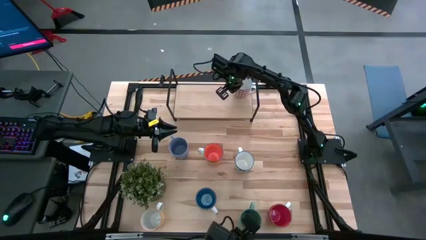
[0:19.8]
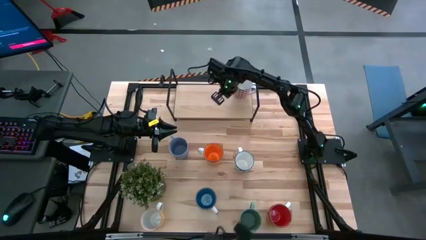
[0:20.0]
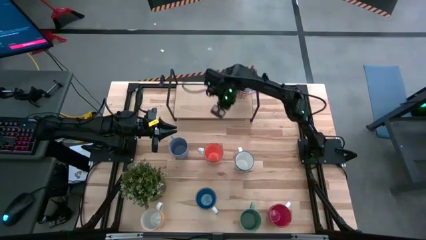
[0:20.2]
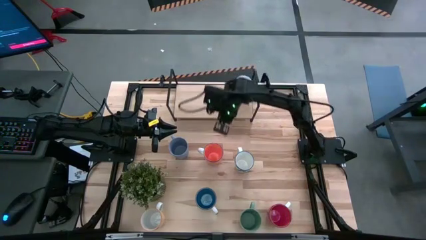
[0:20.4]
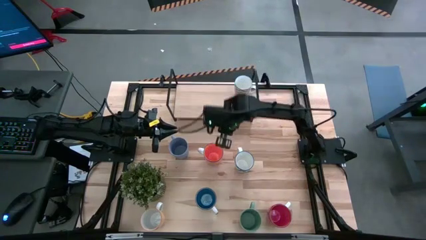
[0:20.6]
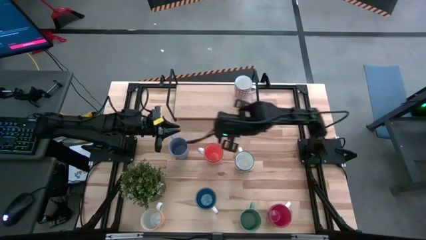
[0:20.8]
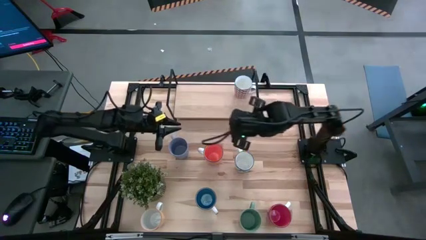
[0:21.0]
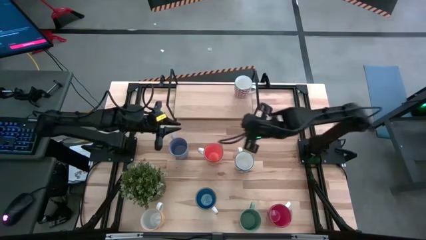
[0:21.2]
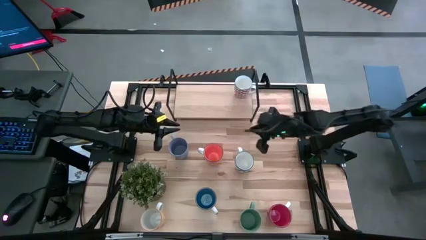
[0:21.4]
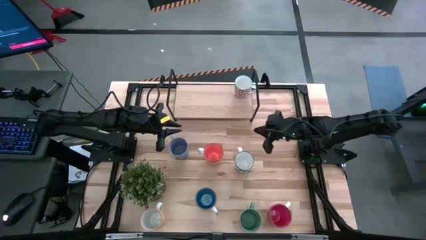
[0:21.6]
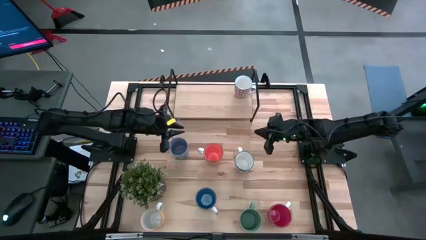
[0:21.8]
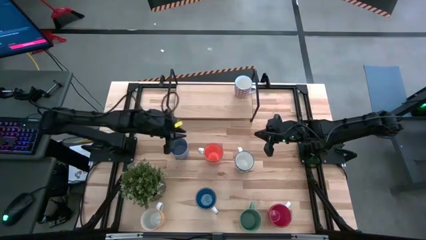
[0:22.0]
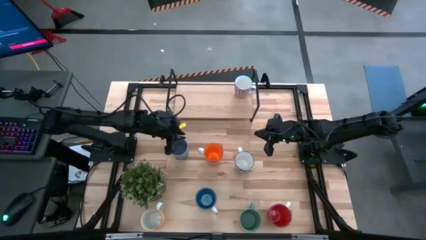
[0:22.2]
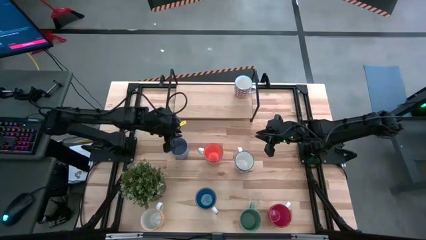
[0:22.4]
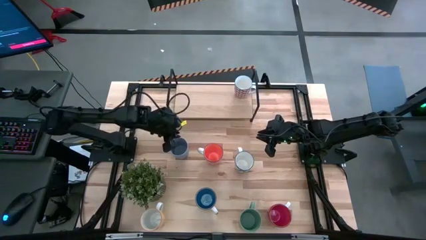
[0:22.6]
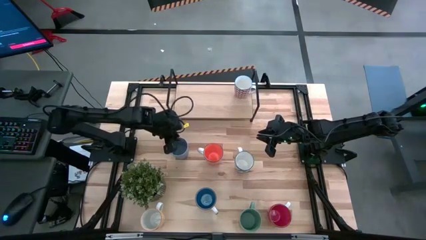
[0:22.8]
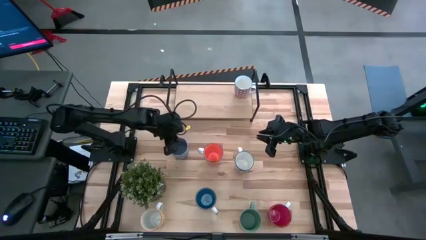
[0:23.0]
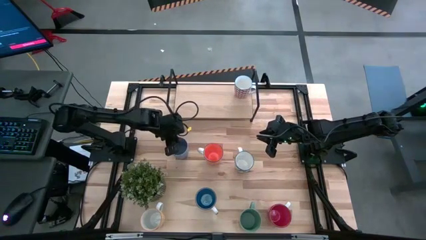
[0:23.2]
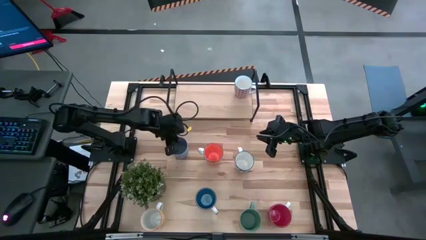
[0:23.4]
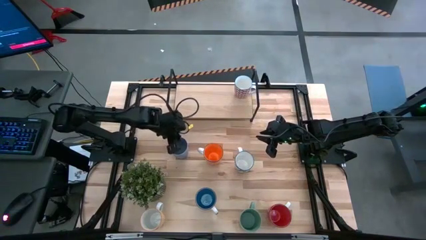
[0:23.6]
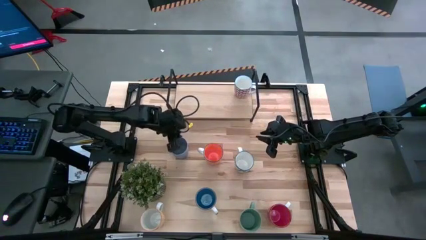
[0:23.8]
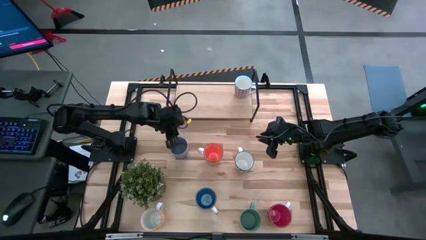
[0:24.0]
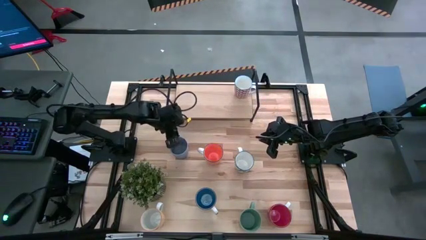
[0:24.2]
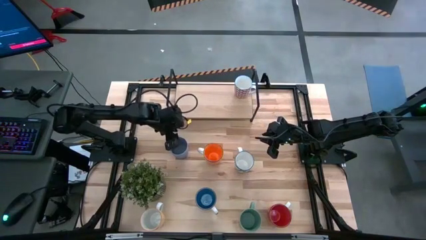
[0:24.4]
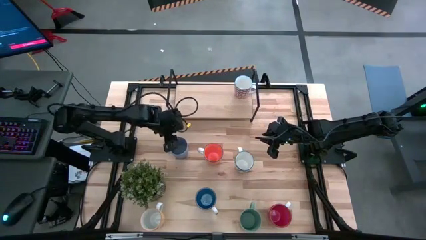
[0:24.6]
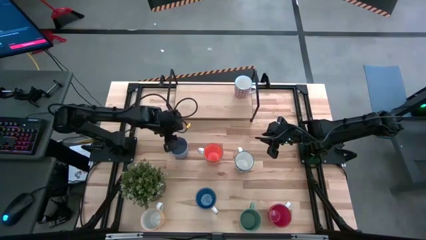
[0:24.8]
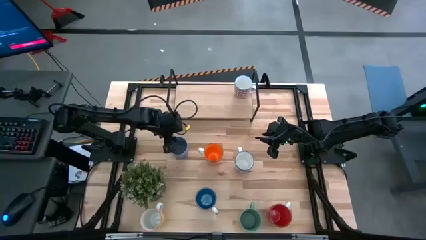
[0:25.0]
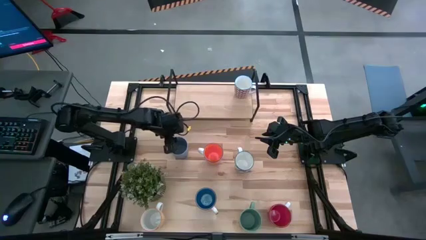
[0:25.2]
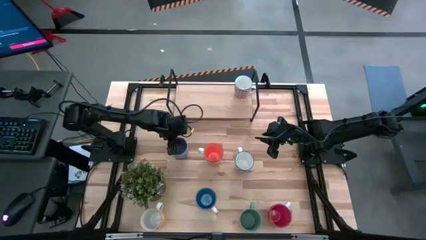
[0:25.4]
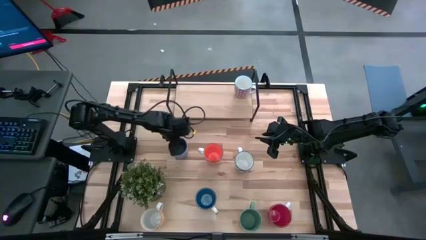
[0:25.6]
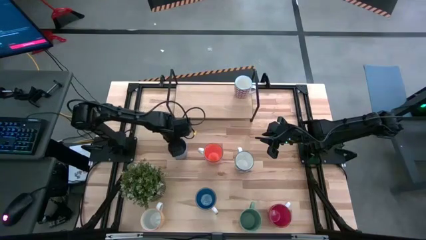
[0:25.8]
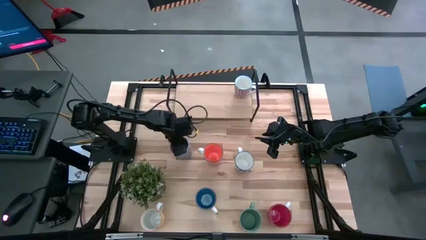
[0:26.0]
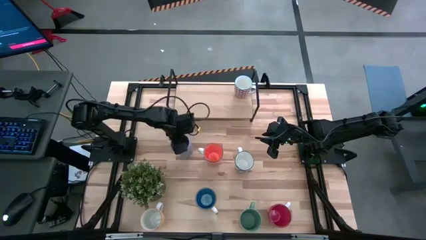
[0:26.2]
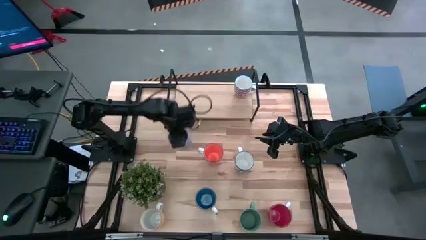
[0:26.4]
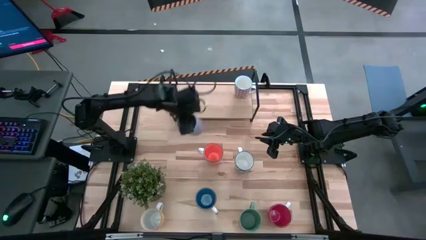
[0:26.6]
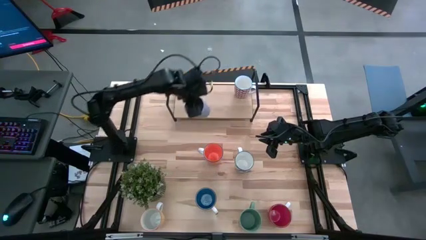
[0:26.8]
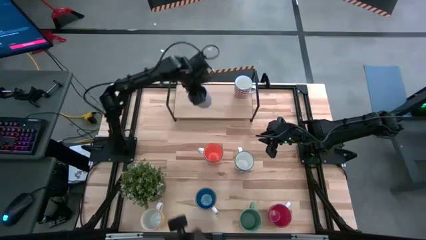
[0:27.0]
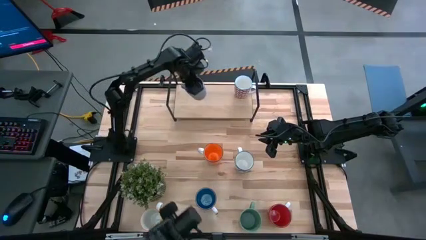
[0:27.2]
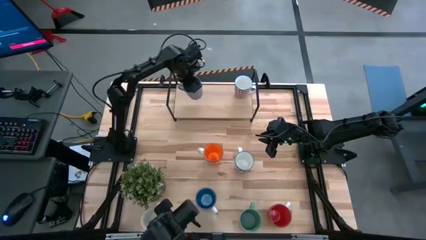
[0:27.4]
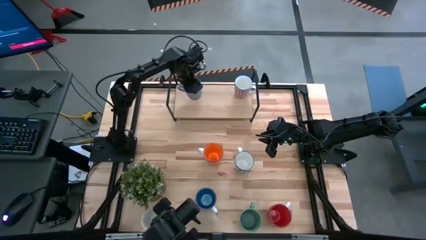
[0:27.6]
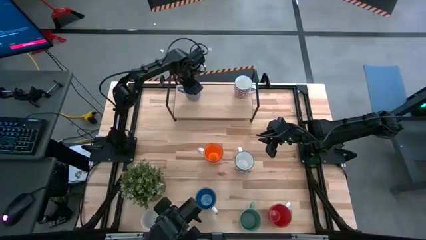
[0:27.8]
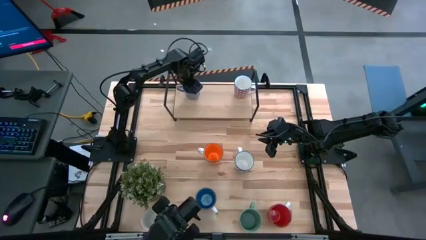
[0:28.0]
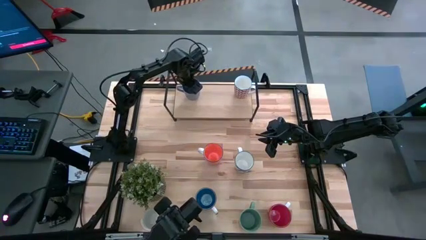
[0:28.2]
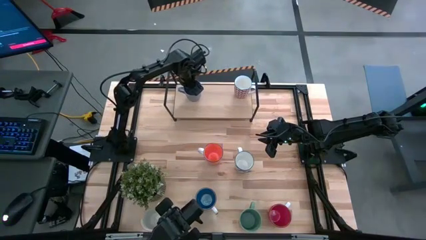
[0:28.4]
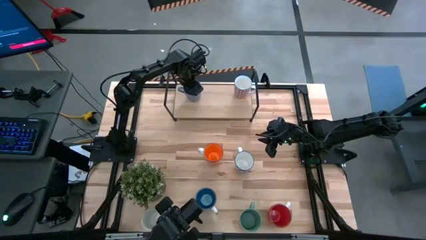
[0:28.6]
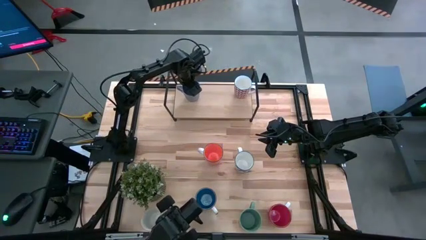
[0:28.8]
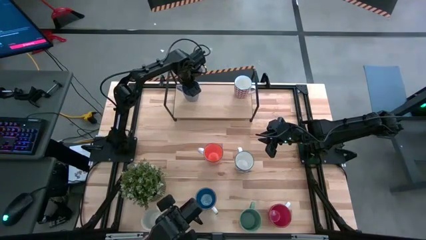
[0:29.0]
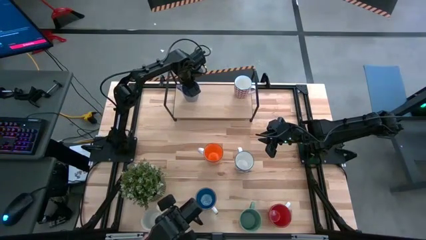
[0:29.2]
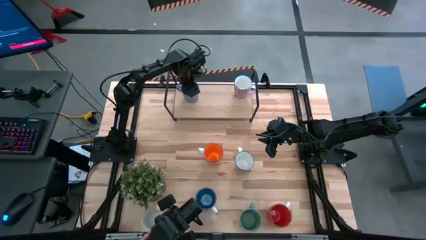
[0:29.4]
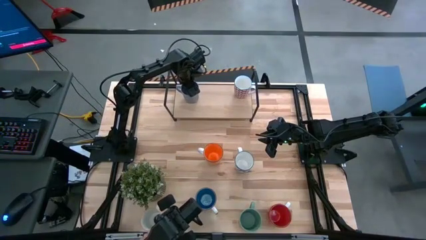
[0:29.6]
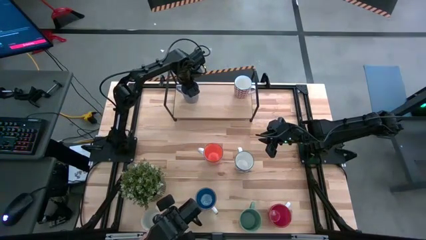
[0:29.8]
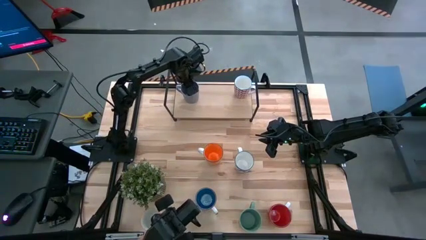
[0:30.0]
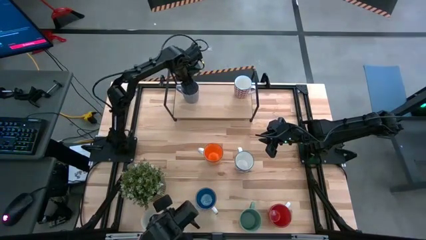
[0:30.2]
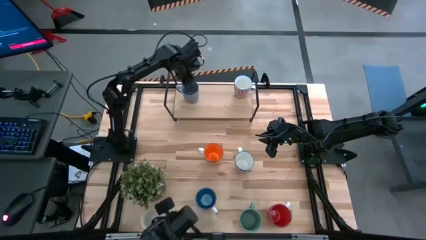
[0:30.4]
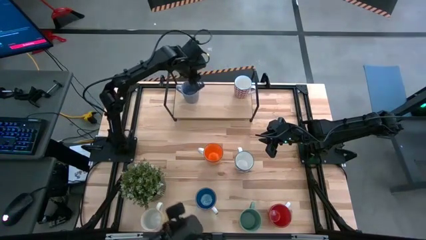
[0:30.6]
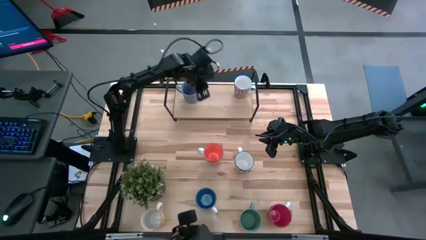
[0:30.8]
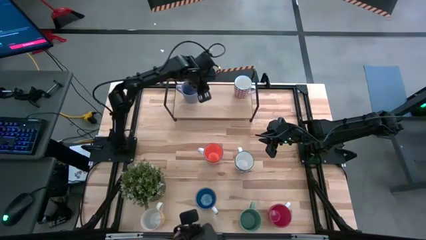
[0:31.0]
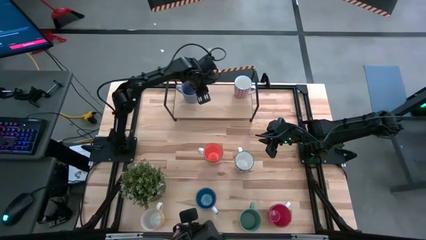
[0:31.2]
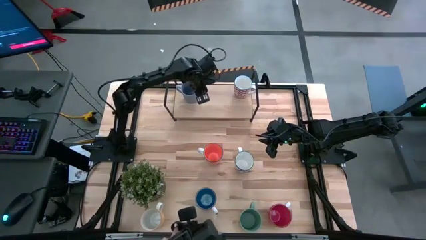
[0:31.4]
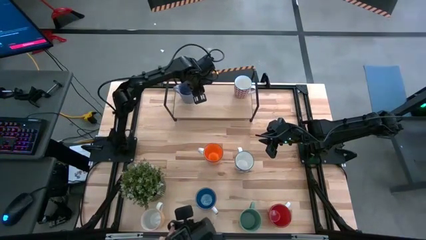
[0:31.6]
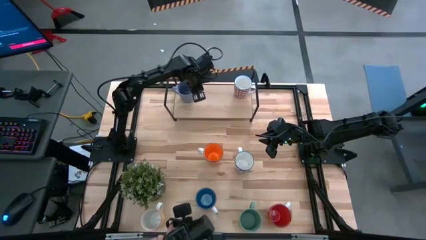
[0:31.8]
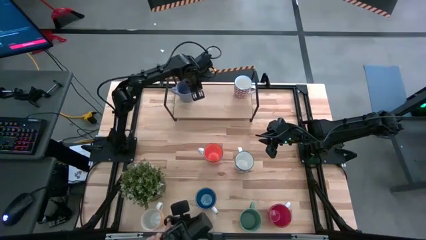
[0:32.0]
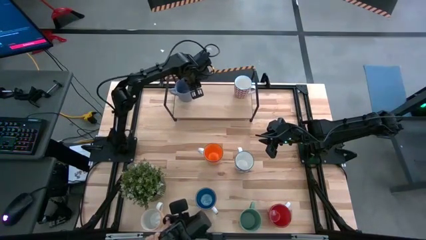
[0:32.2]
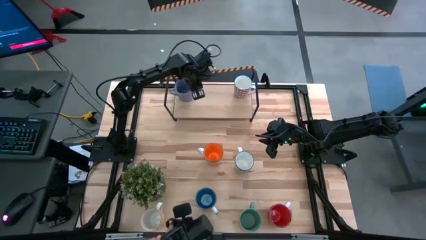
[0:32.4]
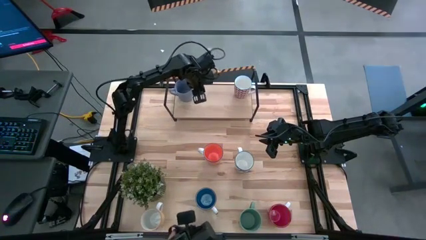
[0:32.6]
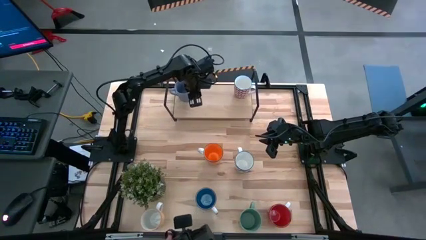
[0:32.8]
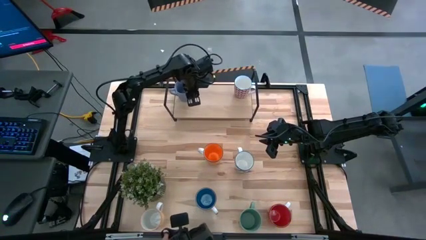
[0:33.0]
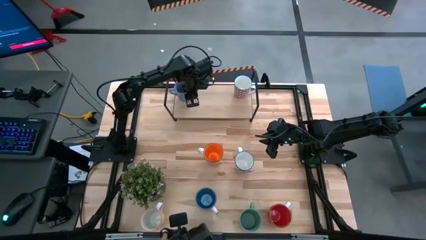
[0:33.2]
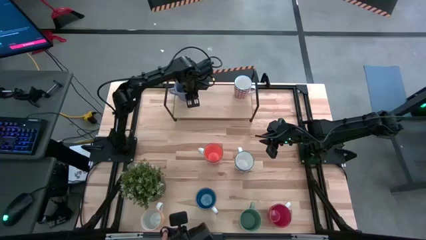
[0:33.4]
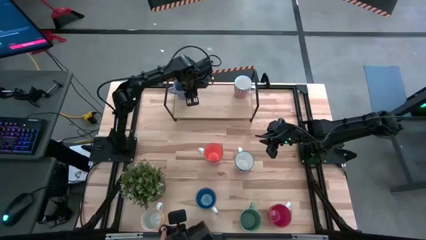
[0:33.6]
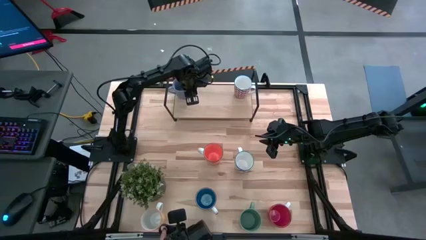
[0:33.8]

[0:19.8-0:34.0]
Task: Place coffee mugs
Put the light purple mug on the shelf
